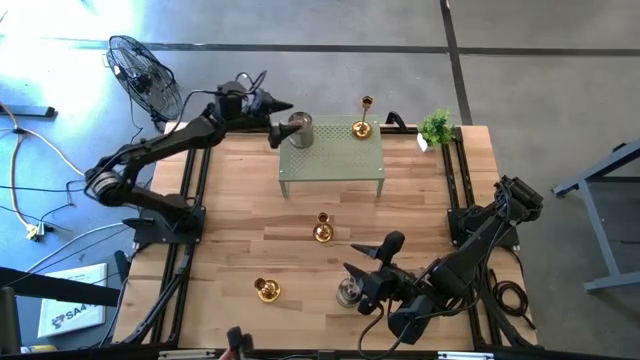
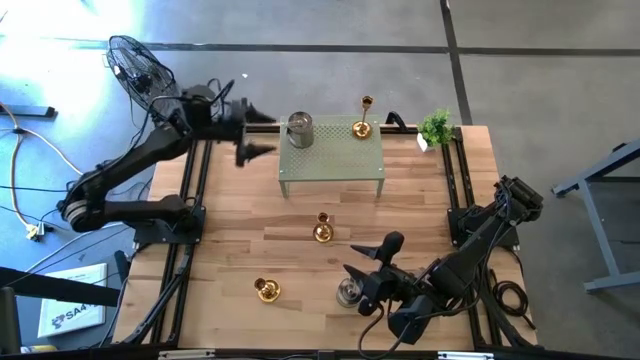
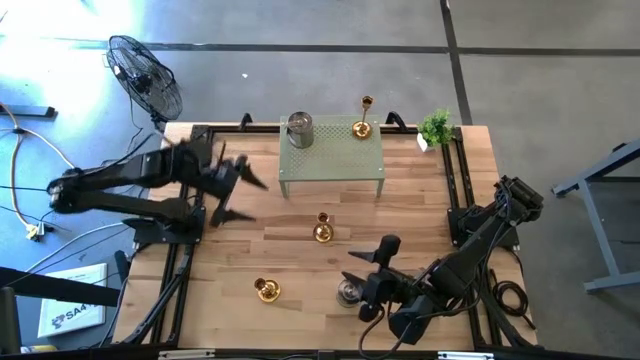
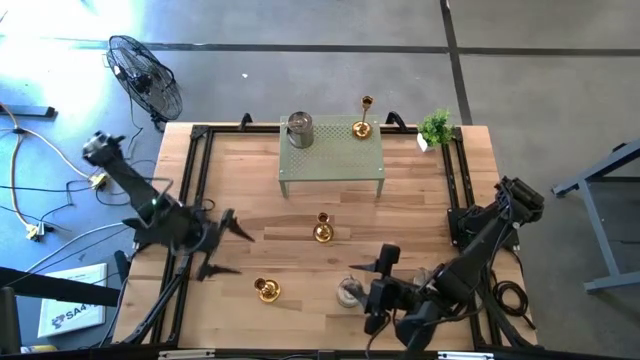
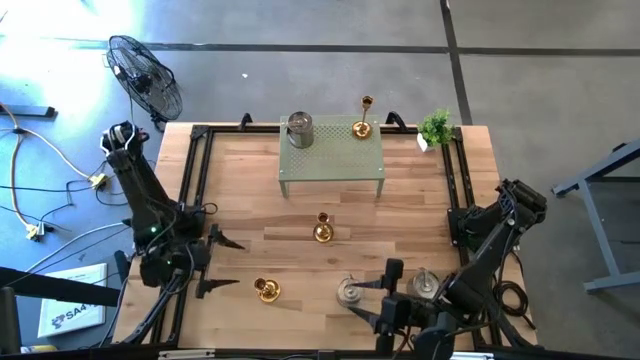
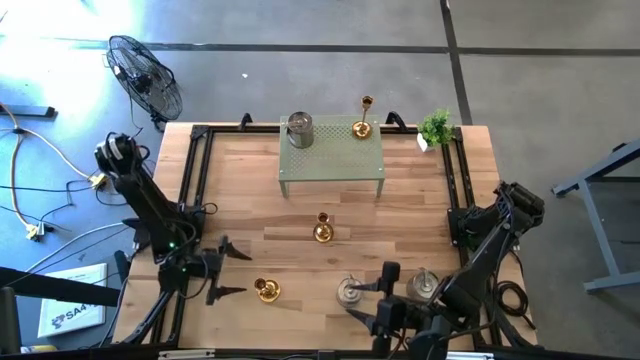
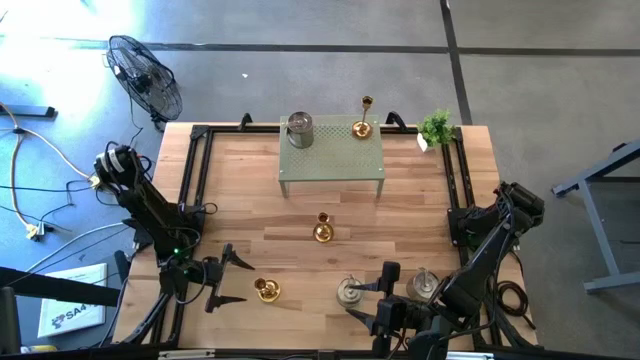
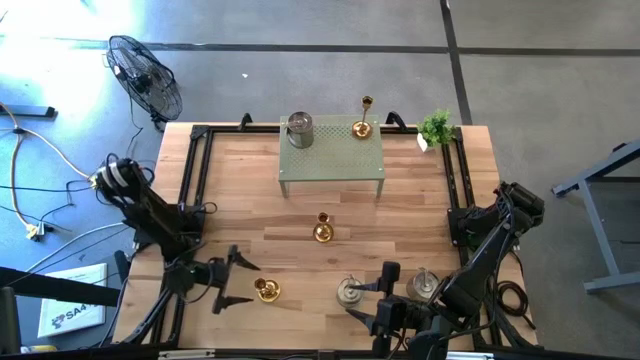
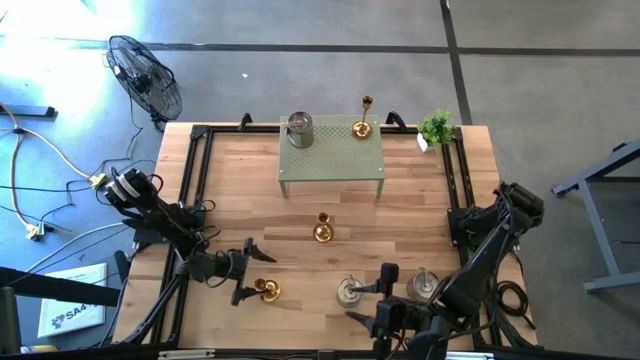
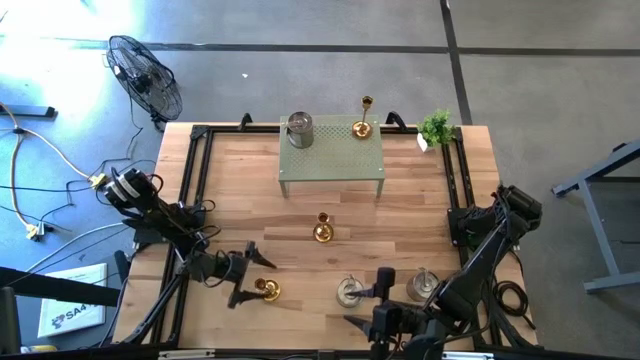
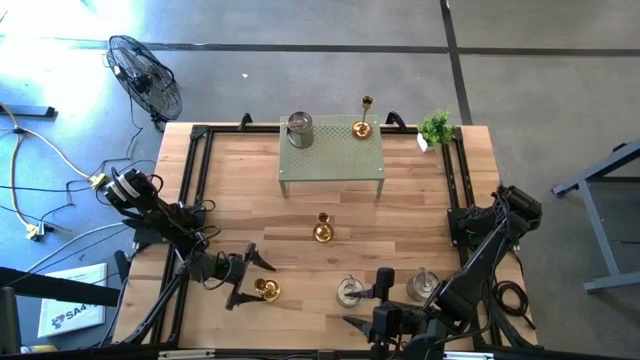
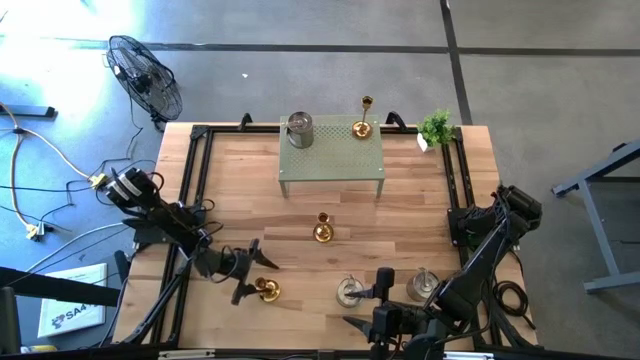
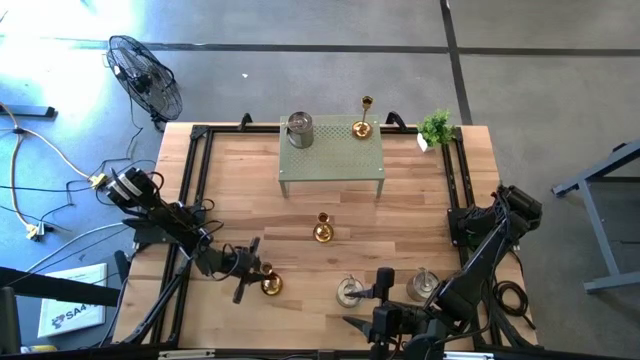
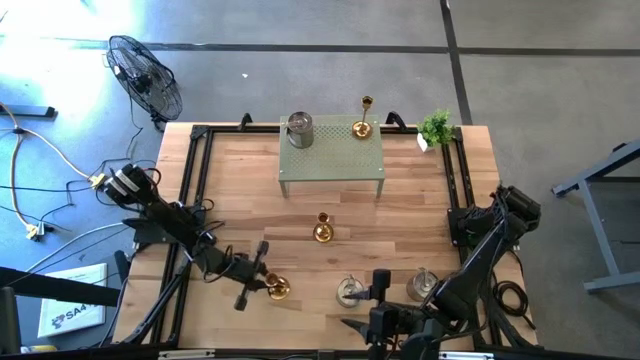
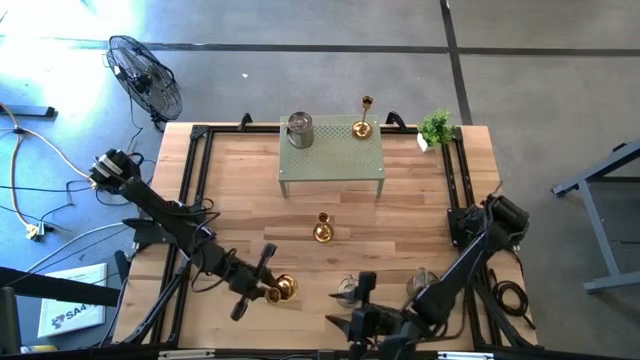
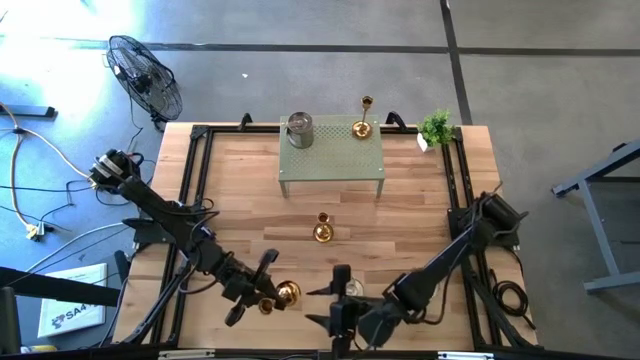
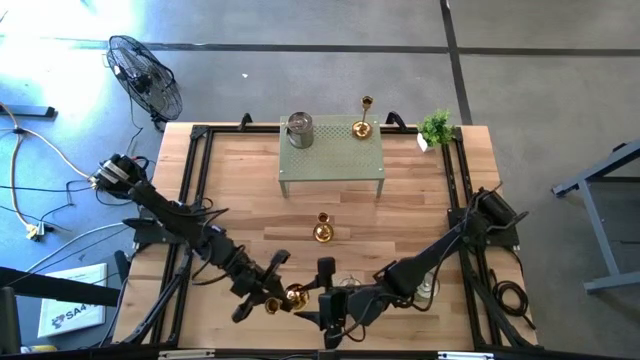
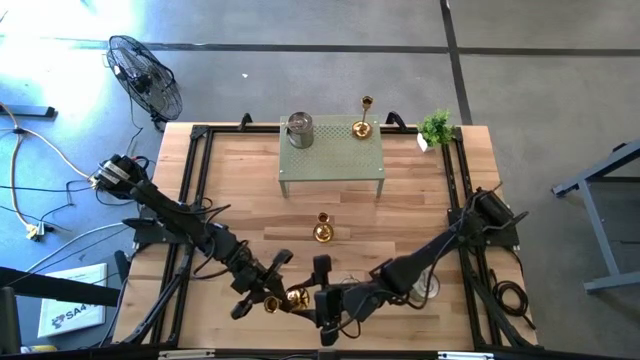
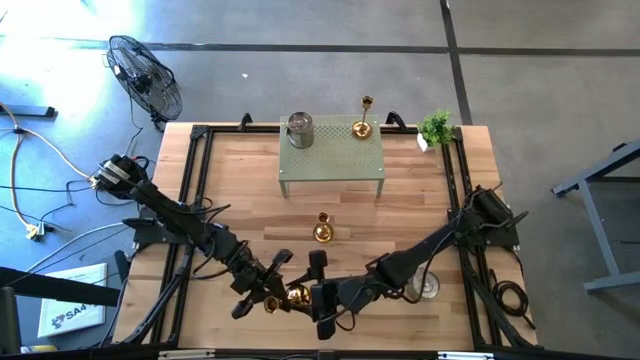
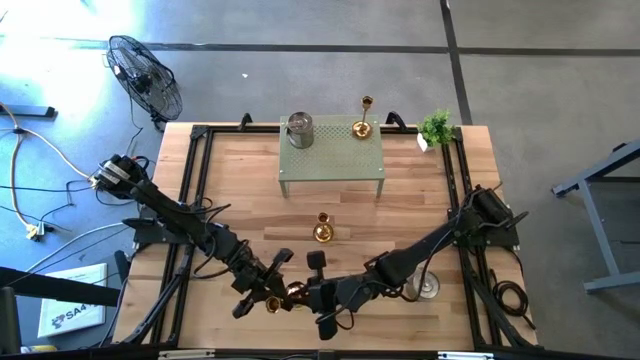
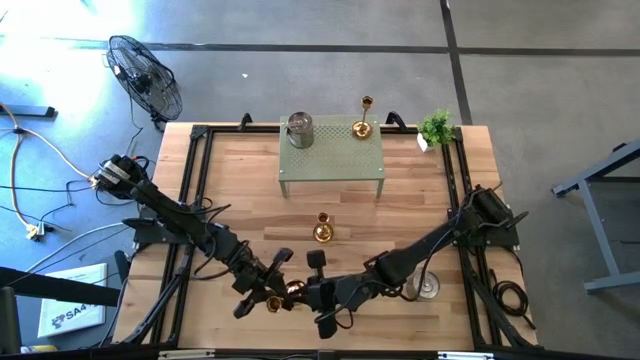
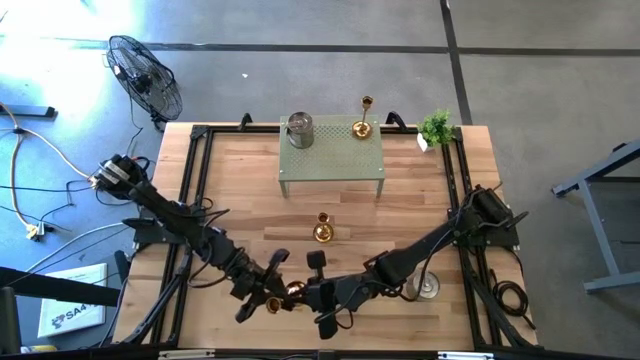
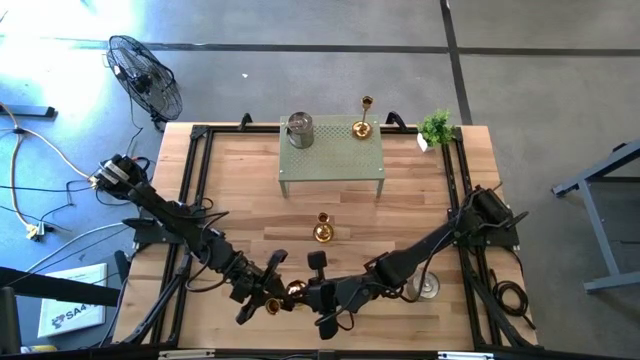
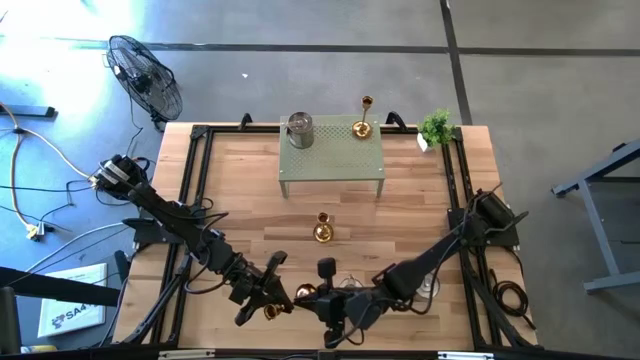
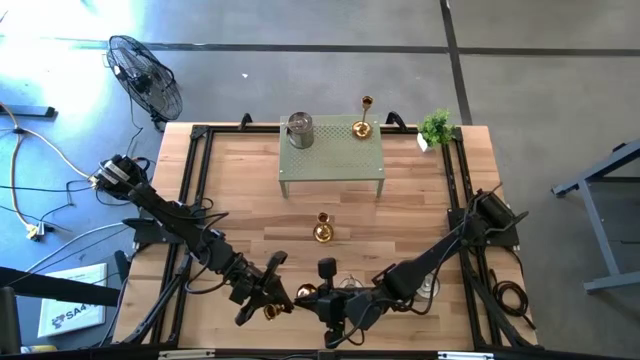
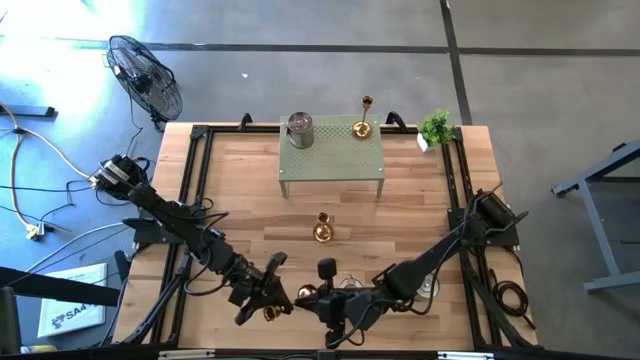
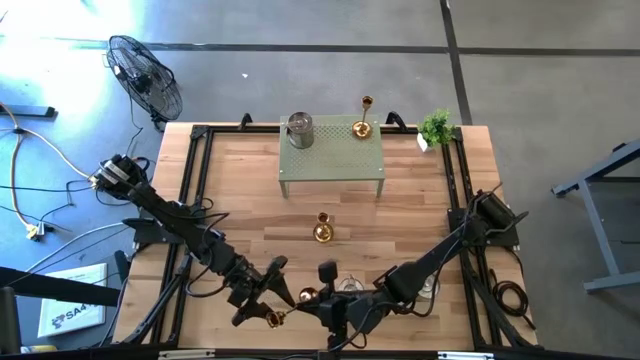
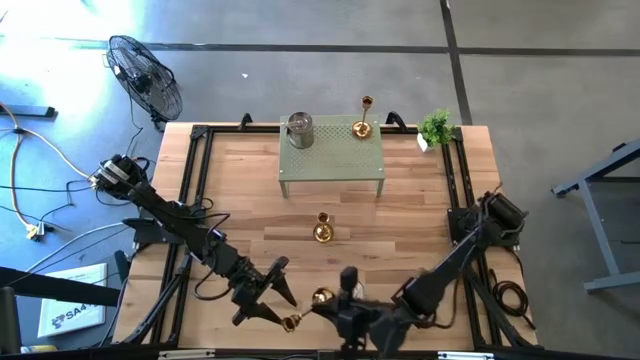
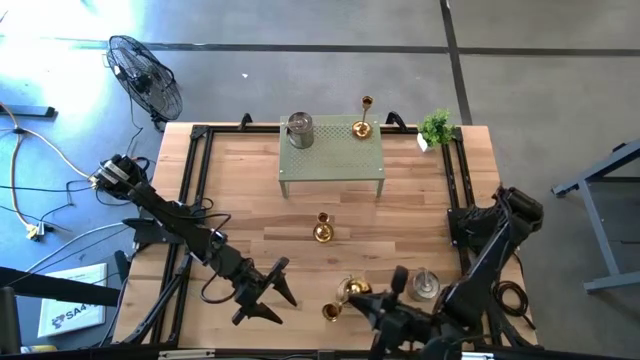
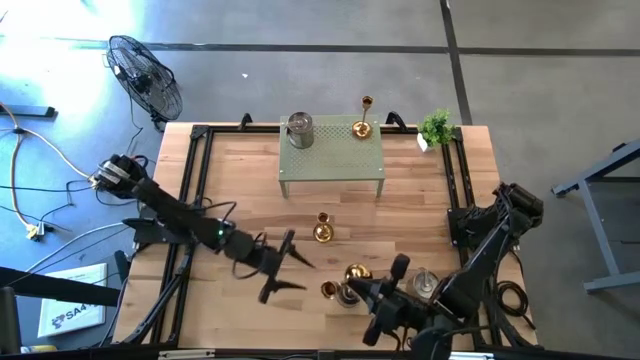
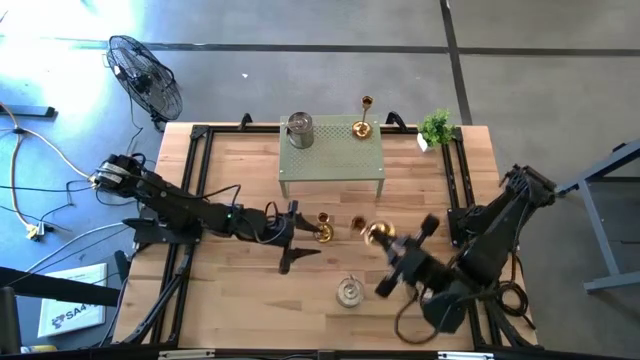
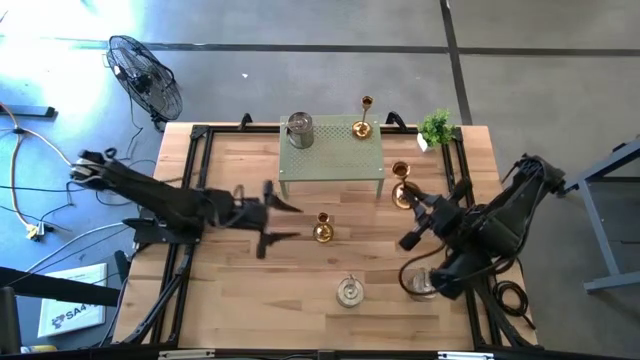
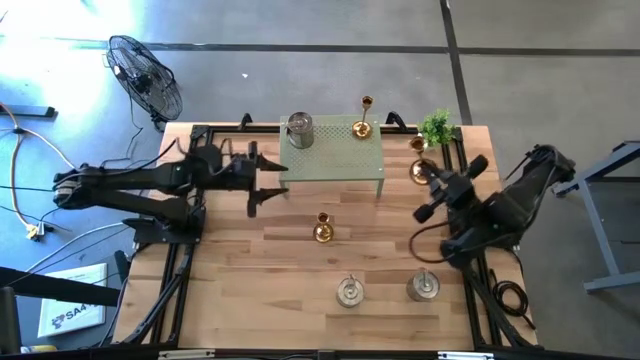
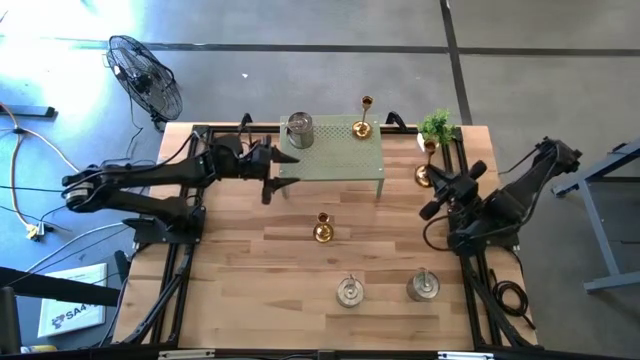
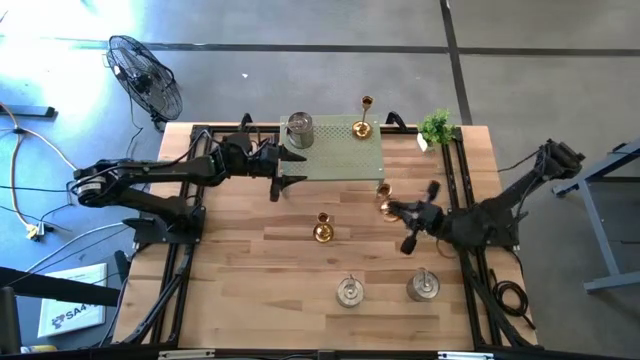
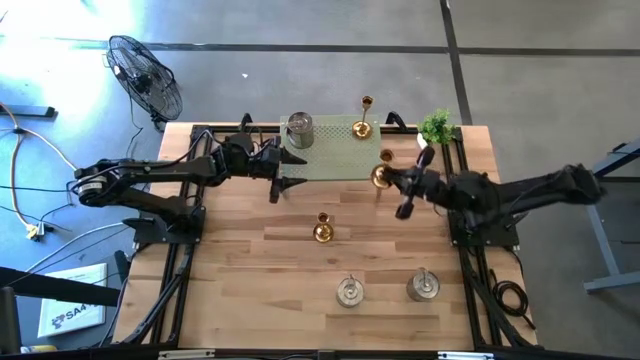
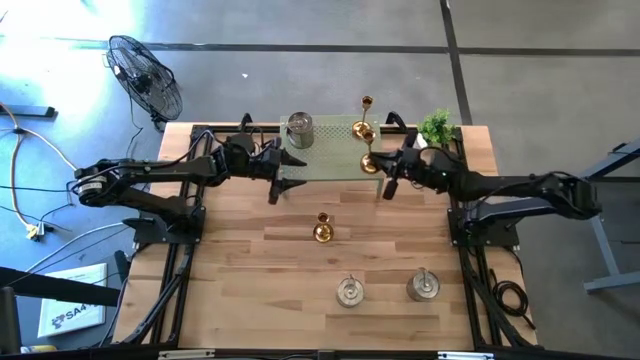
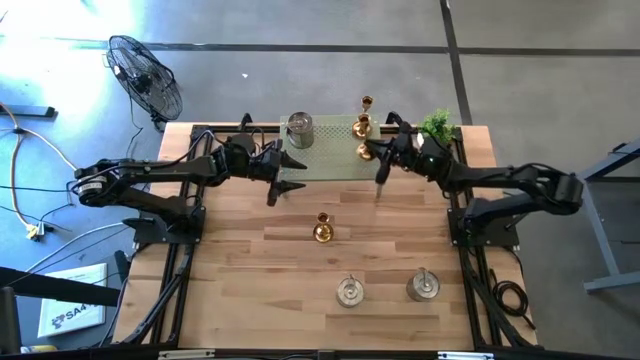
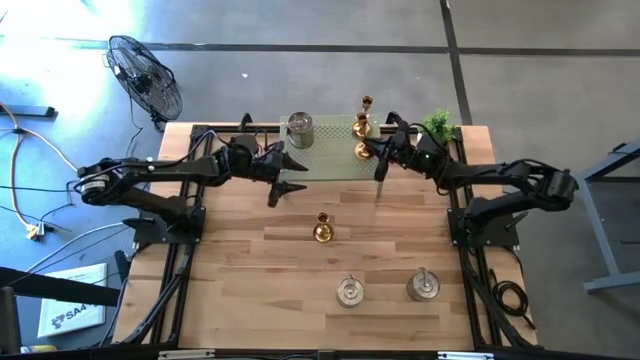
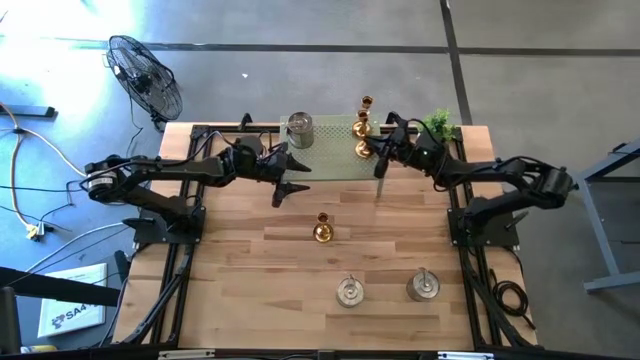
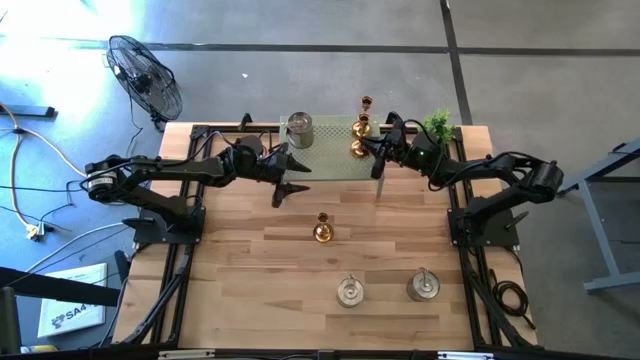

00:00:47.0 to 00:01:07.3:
Task: Pick & Place candle stick holders
Put the bottom gold candle holder on the shelf

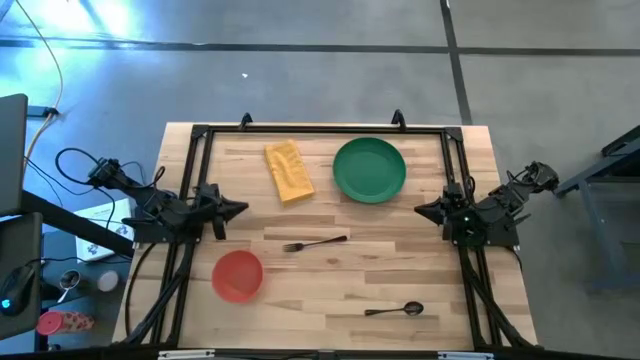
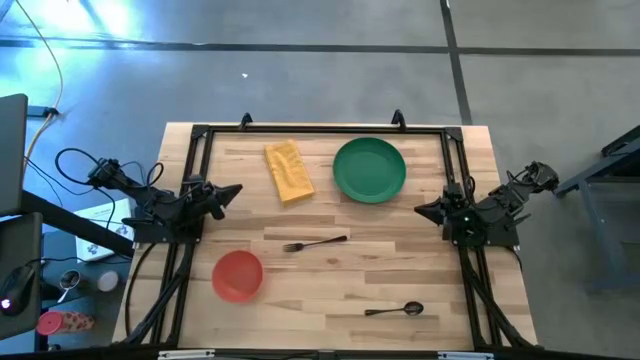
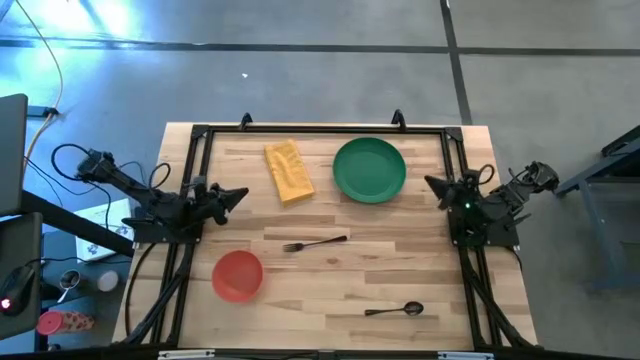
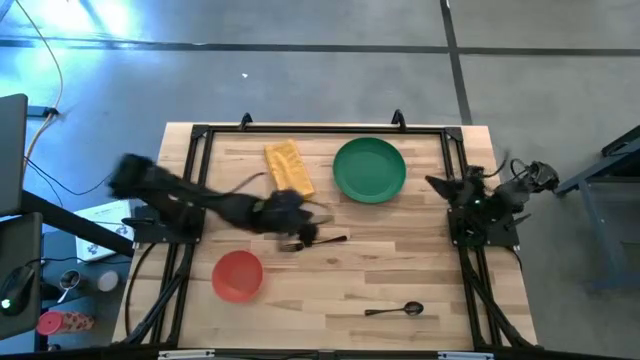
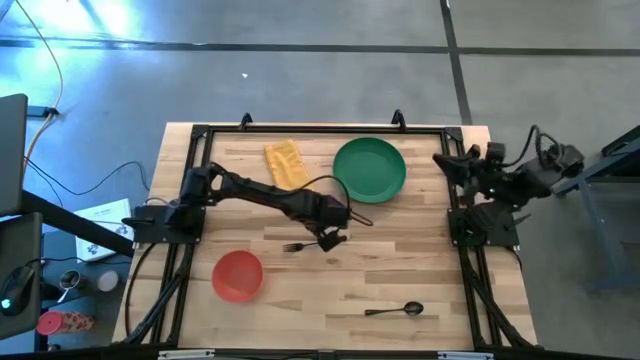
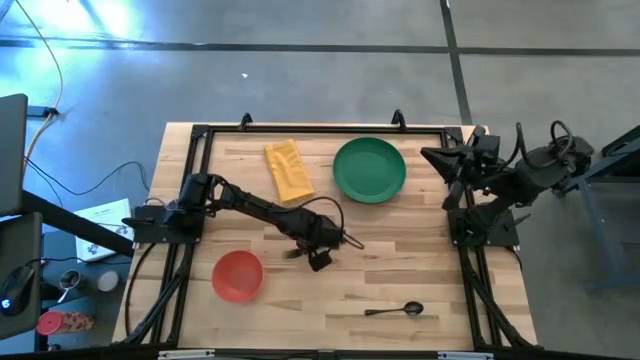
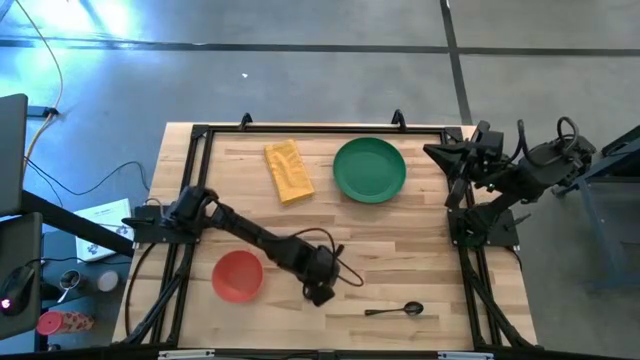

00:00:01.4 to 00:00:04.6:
Task: Set table place
Adjust the black fork on the table
